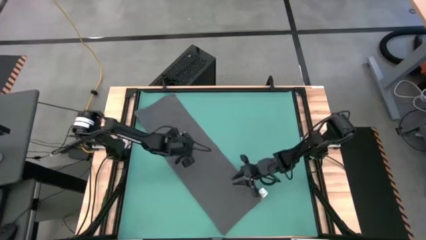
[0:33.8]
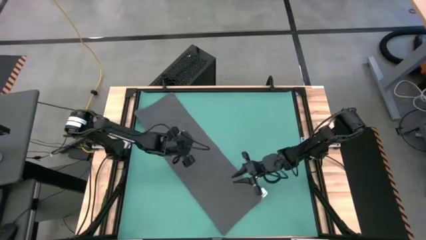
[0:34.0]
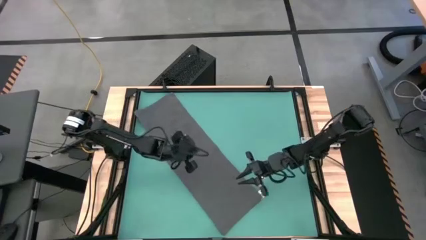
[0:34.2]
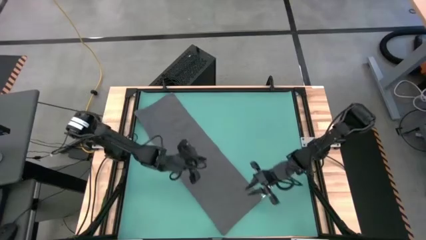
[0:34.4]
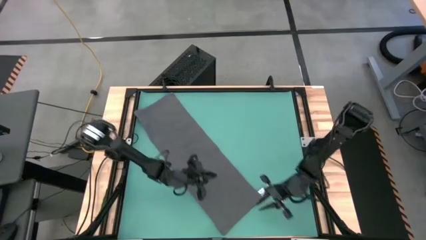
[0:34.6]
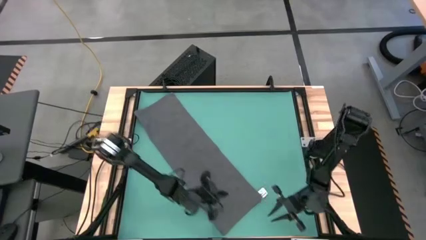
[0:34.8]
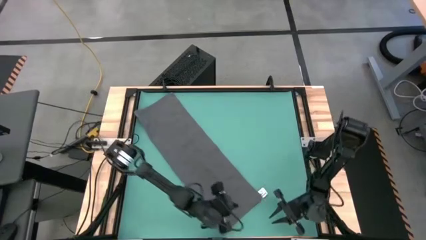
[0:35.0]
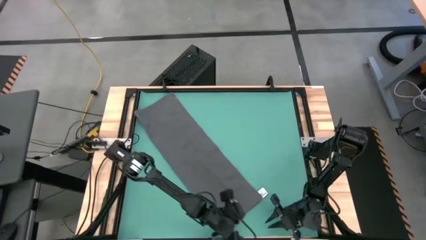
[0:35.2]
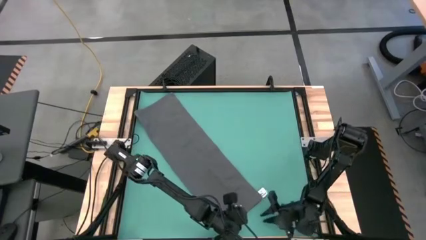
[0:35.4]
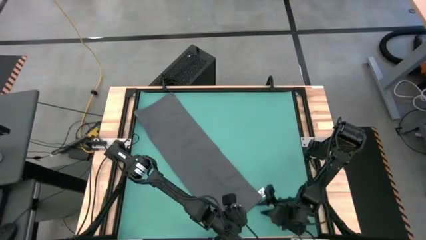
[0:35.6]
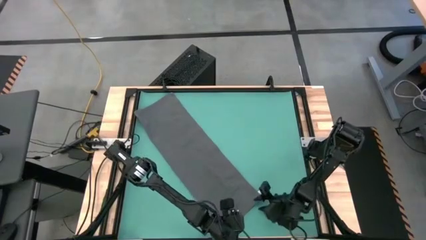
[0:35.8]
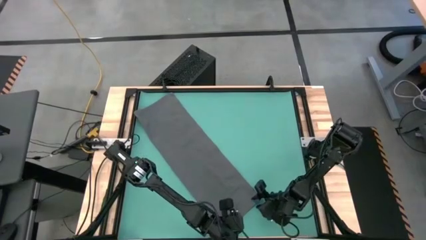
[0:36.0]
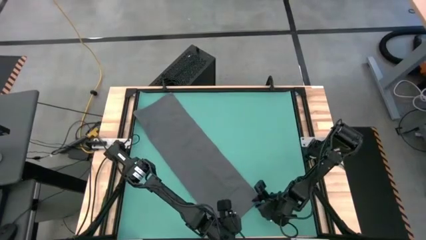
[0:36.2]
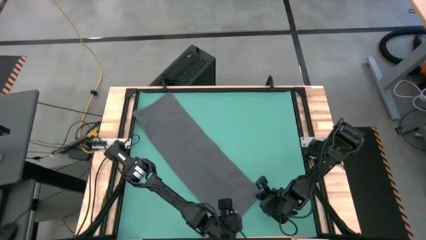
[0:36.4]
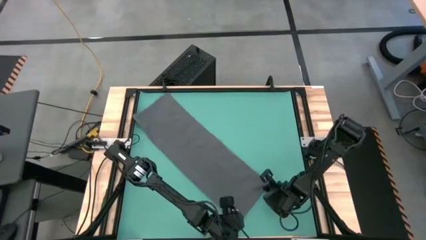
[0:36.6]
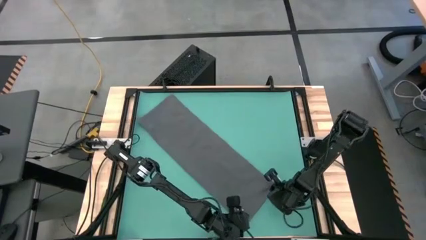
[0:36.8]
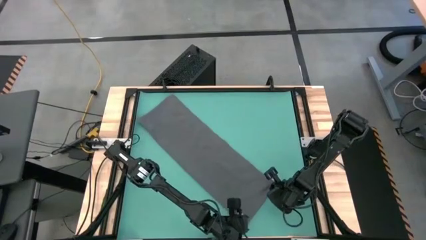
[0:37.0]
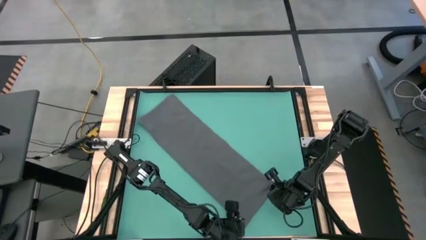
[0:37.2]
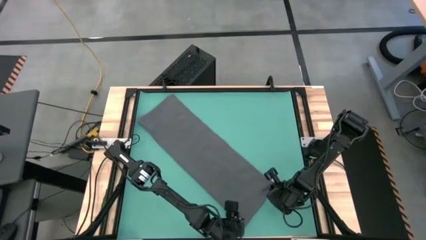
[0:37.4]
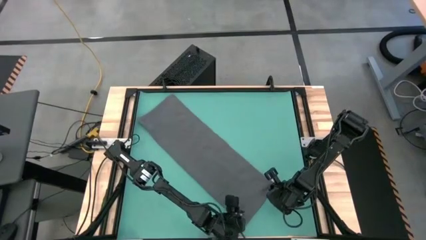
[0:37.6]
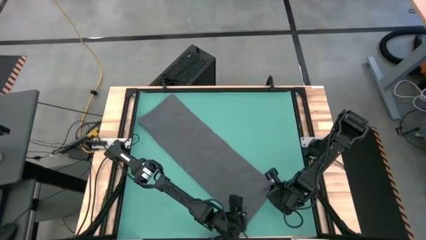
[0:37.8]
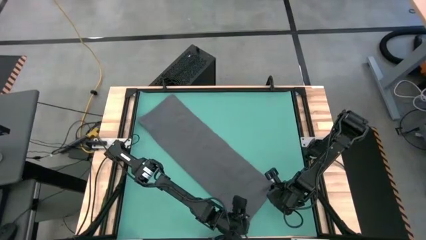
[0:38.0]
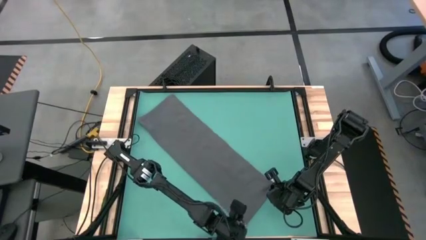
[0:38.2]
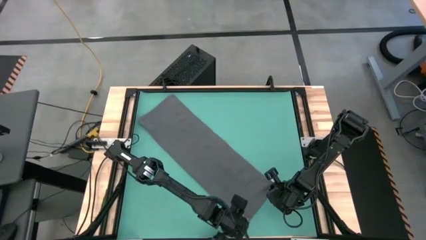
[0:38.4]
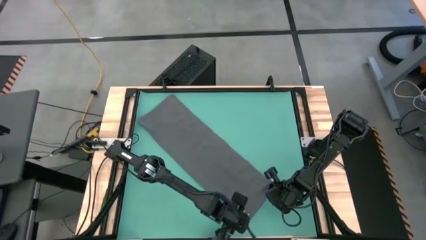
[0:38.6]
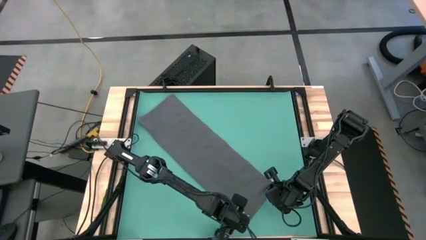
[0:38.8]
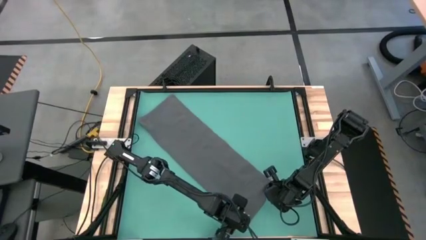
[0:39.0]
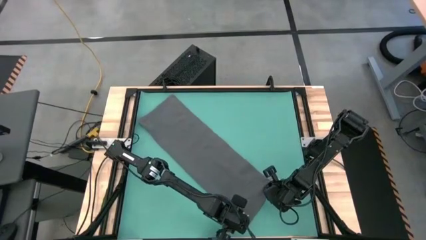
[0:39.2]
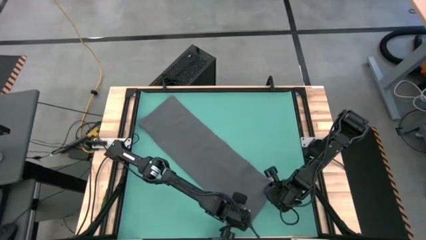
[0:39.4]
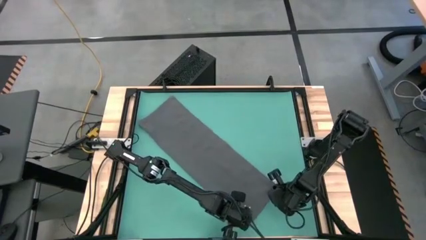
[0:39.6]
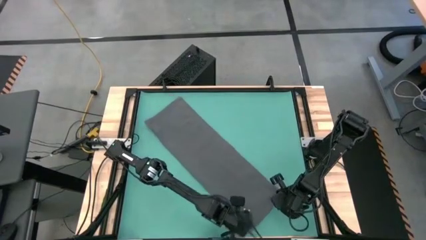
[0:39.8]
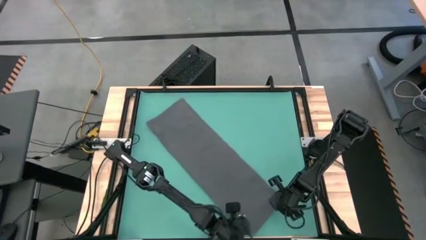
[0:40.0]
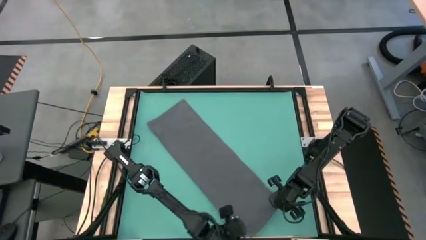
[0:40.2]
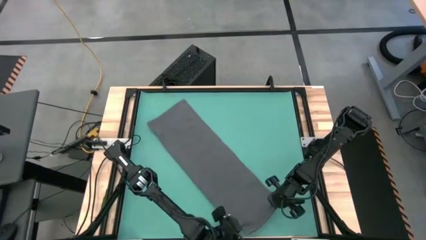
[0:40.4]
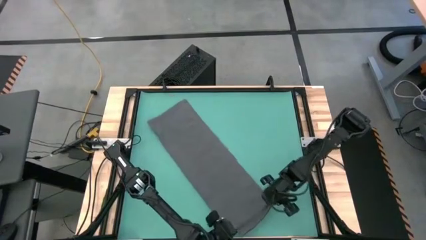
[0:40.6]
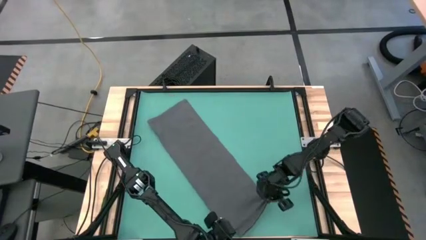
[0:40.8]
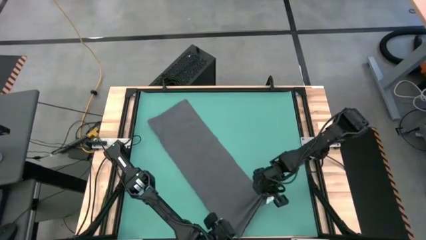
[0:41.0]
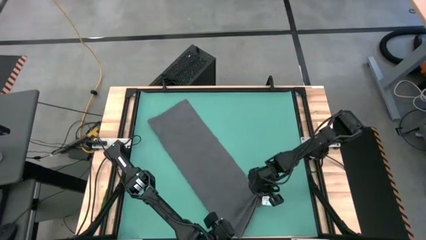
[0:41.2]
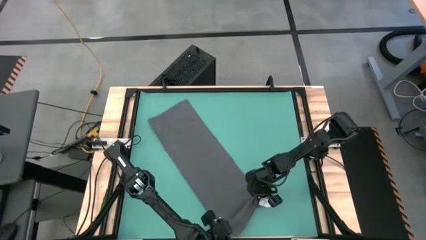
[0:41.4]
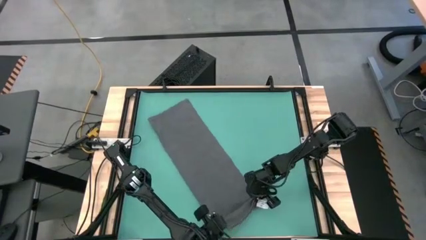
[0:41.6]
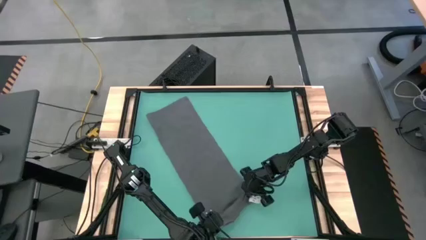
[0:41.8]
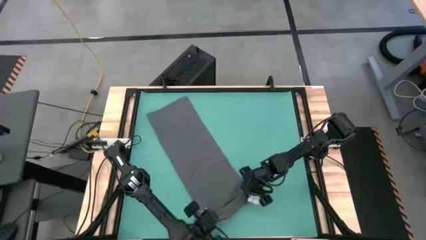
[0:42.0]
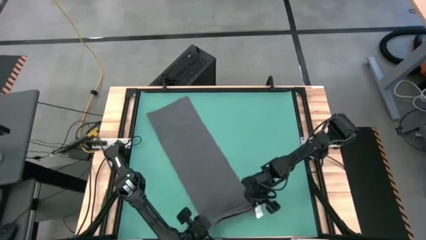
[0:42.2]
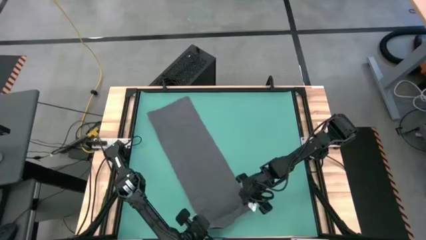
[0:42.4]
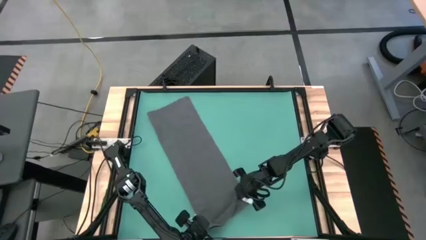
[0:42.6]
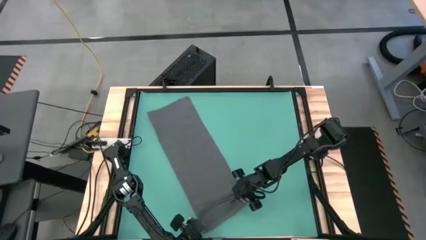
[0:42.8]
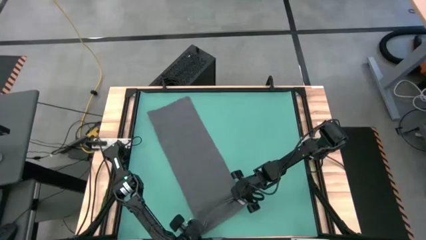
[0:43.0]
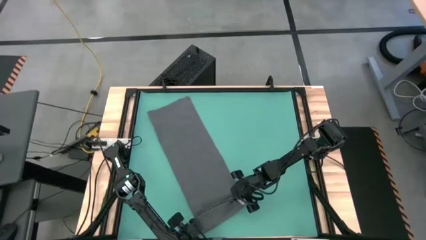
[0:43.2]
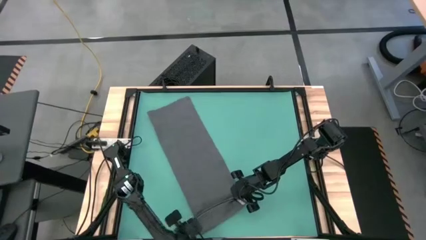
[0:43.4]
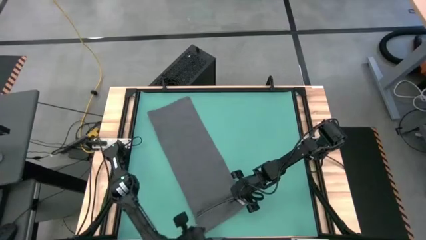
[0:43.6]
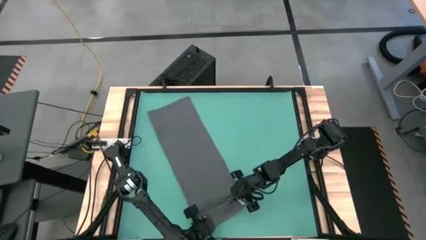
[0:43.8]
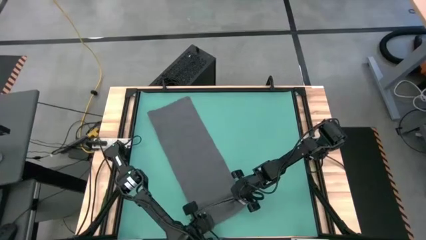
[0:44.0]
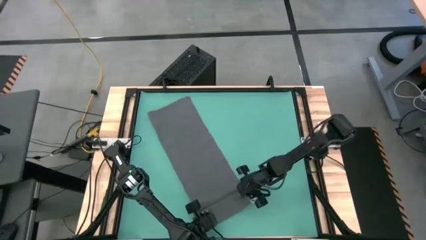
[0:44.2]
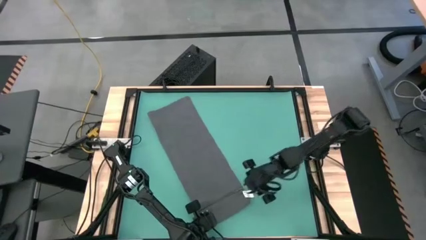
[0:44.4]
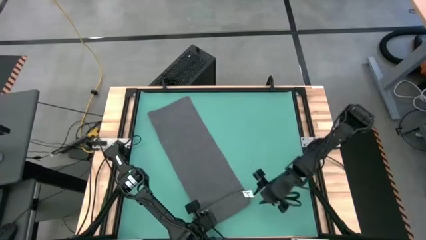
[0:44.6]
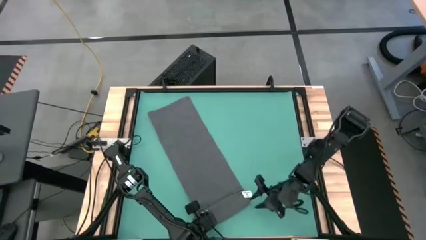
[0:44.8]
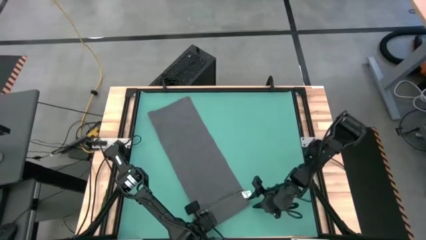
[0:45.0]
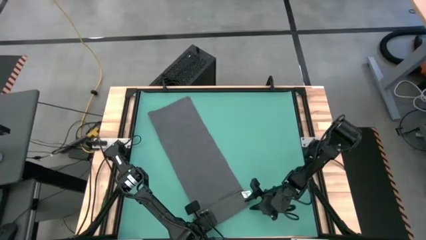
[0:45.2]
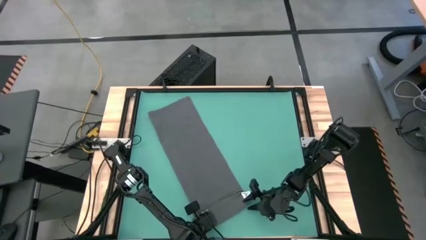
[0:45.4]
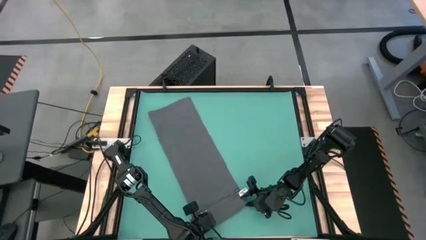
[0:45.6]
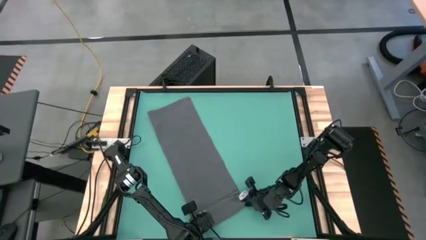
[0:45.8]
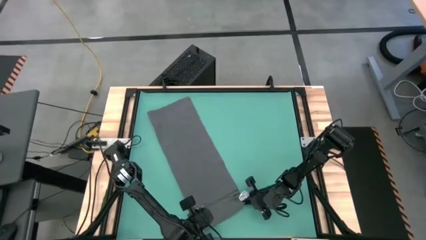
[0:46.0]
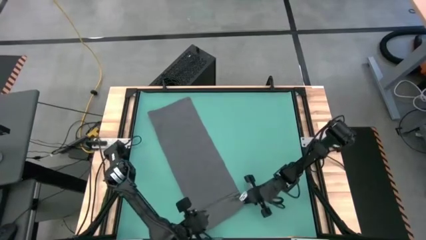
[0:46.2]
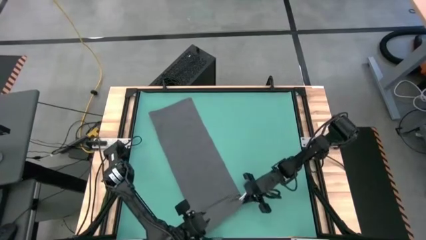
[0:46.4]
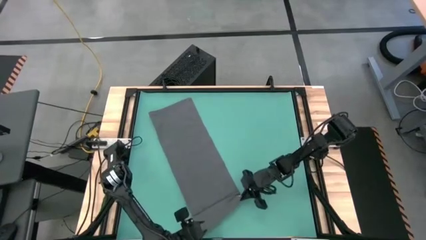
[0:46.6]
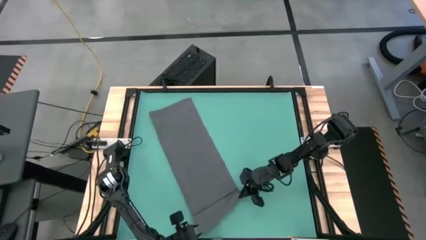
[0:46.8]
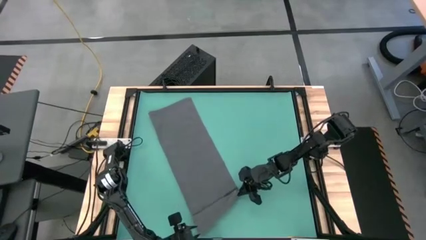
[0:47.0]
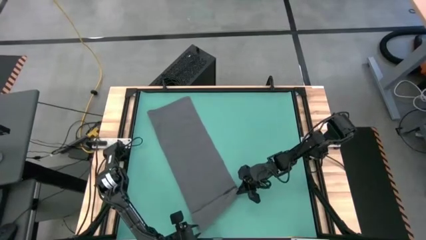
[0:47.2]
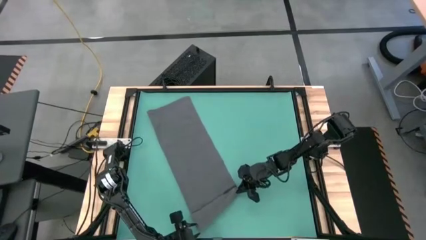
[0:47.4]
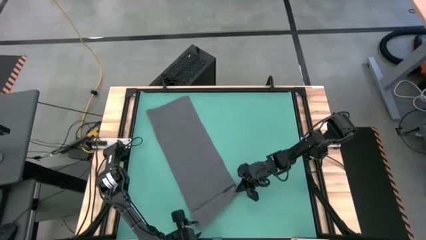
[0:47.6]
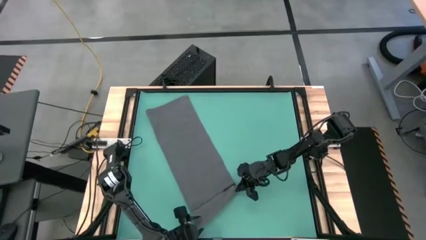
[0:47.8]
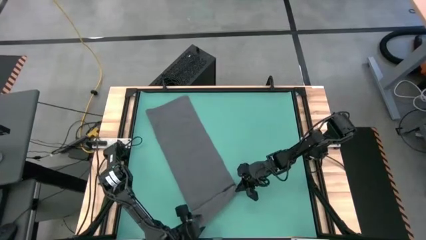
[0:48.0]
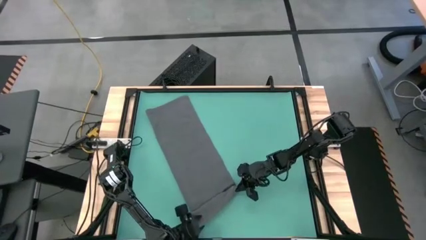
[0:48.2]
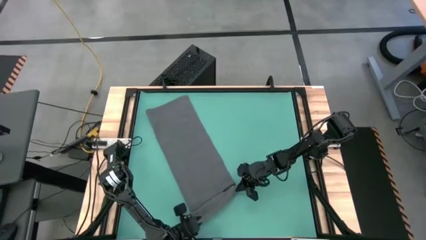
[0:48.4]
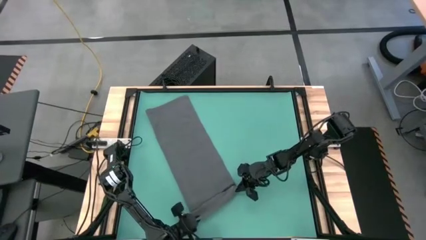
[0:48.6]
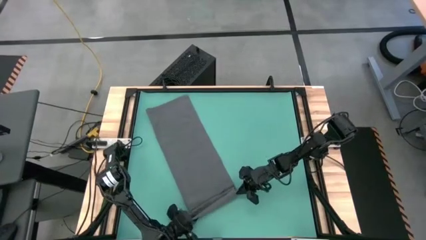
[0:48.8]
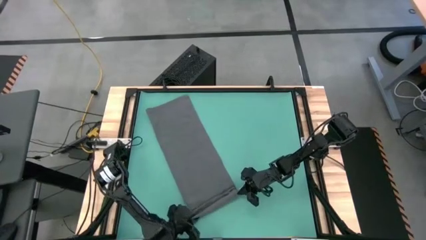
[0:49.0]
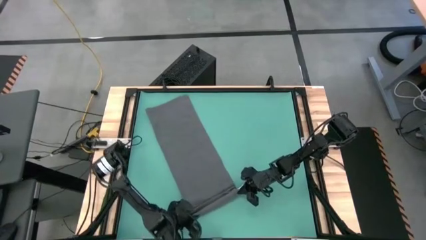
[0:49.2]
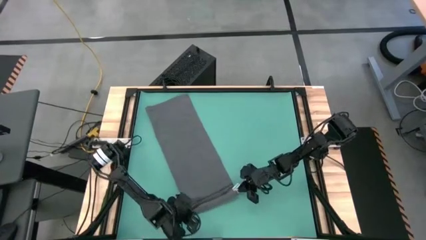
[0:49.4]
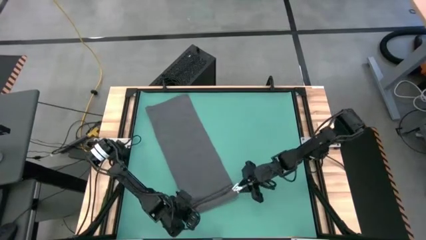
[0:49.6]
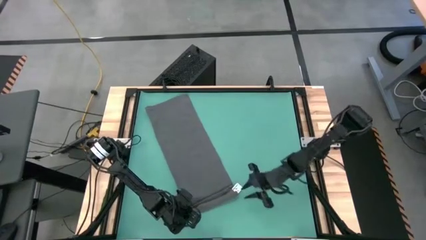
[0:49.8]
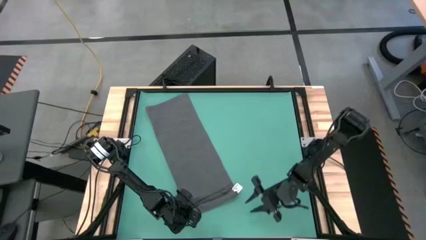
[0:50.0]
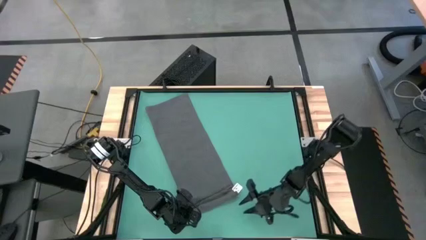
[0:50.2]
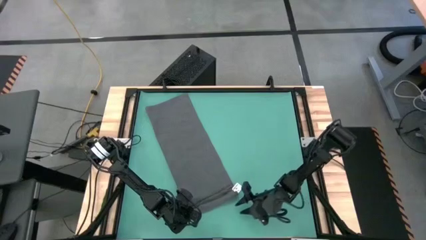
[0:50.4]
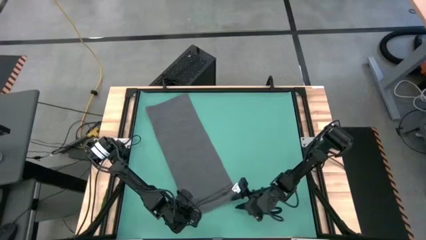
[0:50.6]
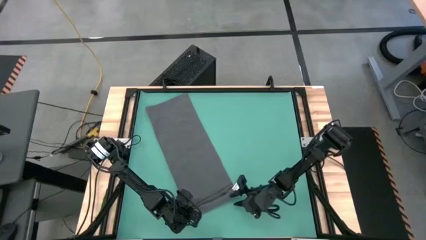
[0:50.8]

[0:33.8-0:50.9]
Task: Roll towel into tight, uniform cylinder
Roll the gray towel
